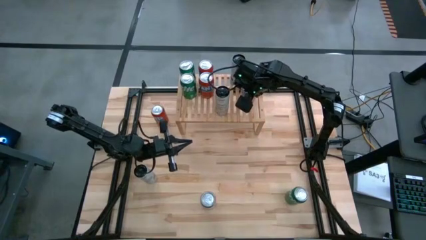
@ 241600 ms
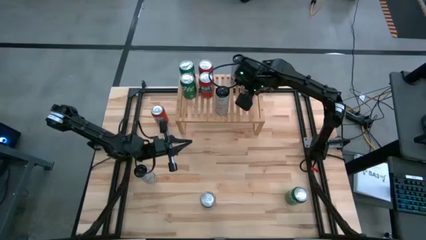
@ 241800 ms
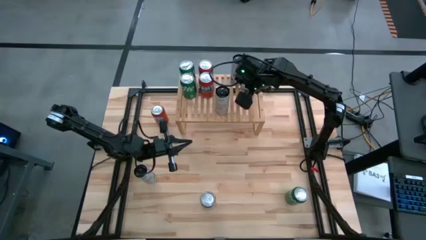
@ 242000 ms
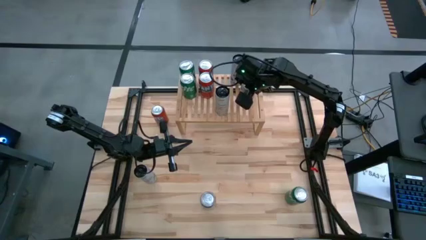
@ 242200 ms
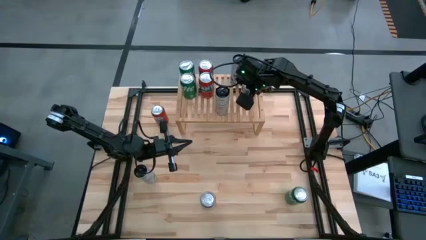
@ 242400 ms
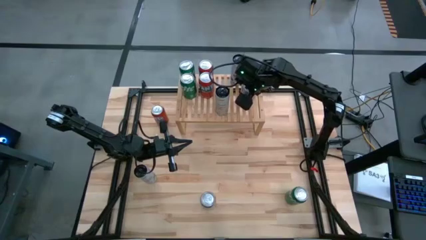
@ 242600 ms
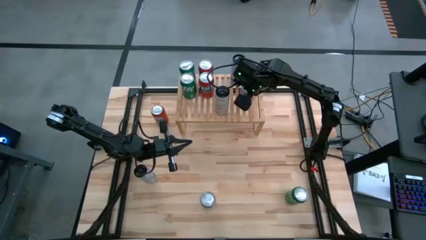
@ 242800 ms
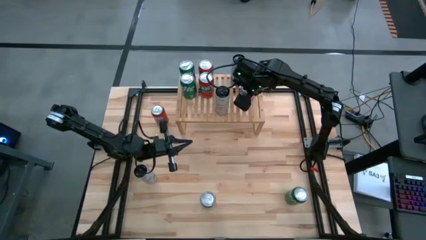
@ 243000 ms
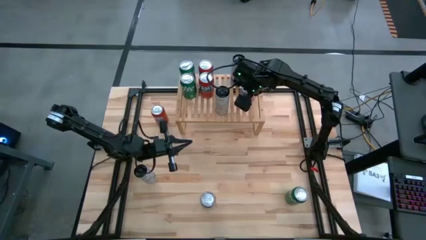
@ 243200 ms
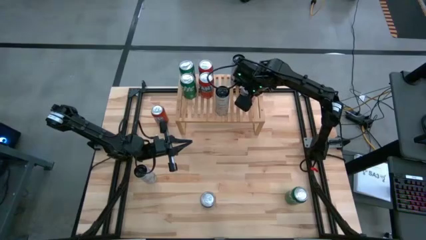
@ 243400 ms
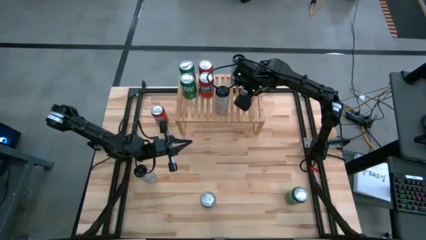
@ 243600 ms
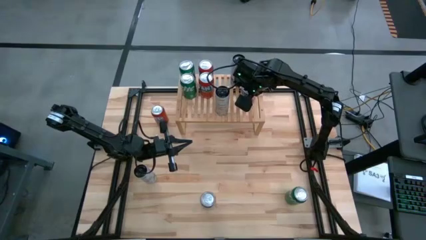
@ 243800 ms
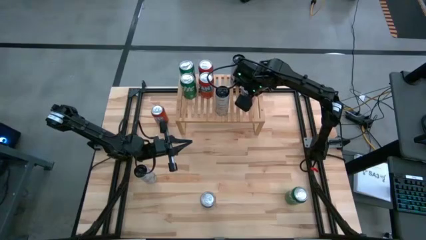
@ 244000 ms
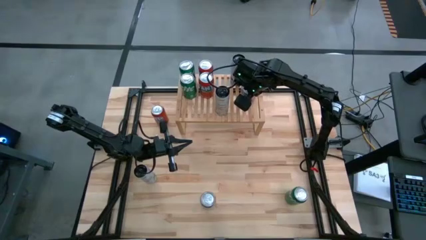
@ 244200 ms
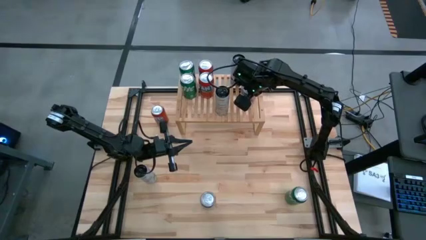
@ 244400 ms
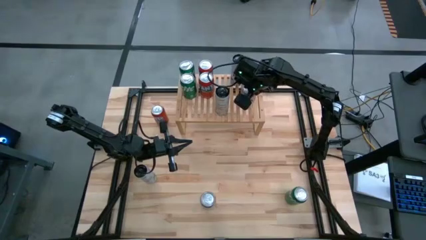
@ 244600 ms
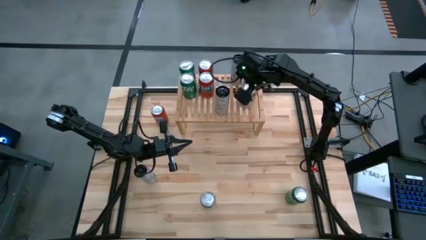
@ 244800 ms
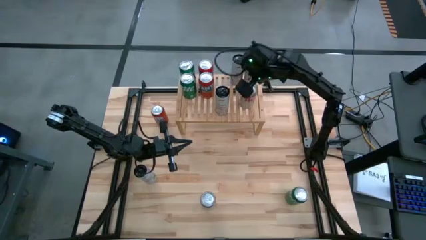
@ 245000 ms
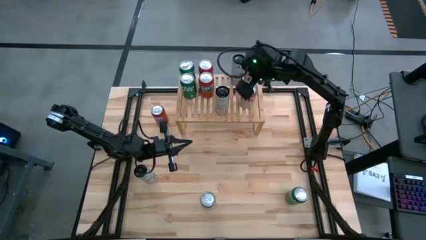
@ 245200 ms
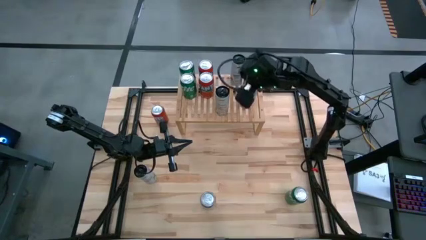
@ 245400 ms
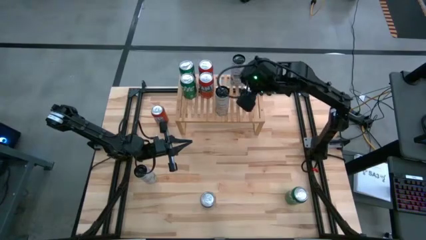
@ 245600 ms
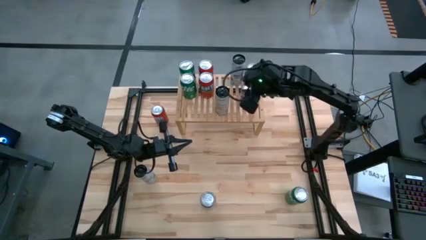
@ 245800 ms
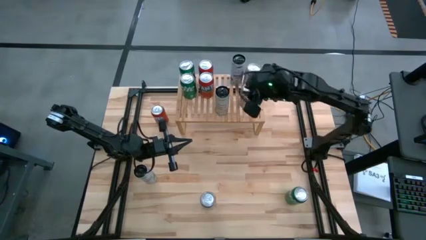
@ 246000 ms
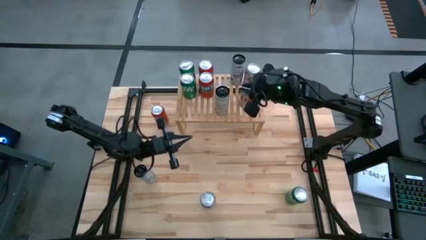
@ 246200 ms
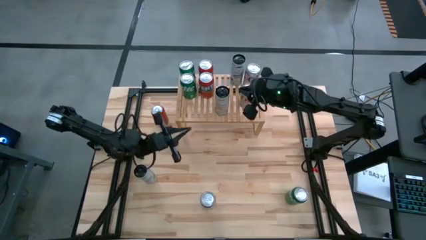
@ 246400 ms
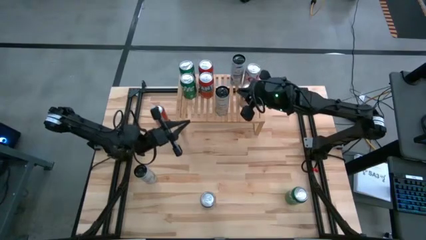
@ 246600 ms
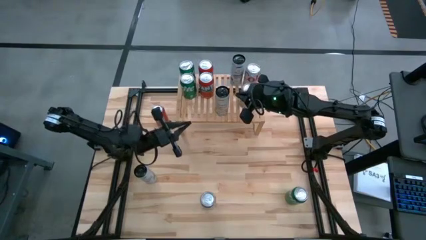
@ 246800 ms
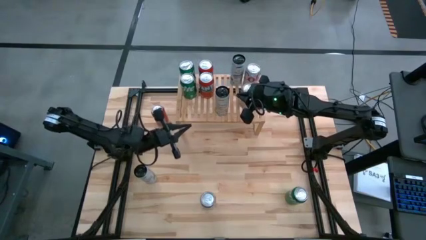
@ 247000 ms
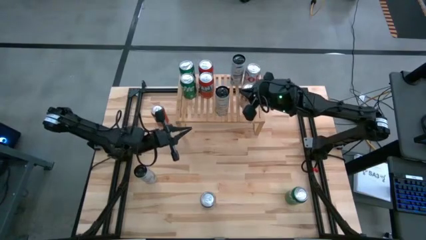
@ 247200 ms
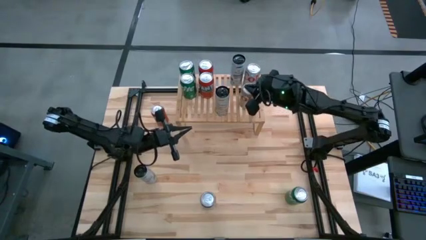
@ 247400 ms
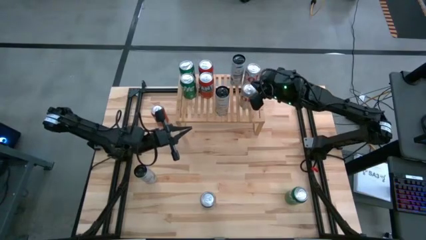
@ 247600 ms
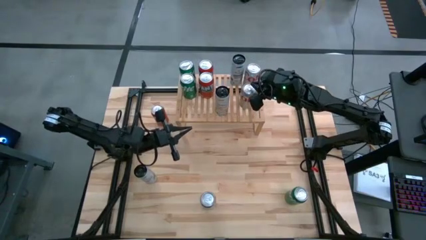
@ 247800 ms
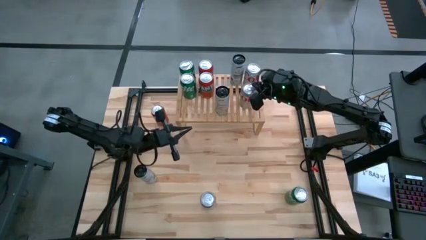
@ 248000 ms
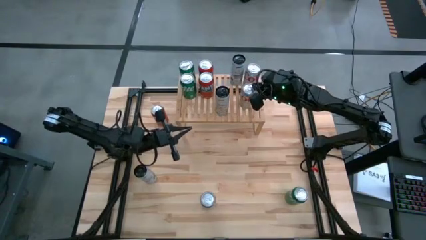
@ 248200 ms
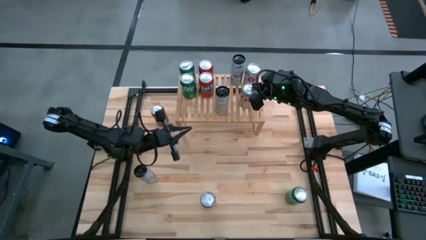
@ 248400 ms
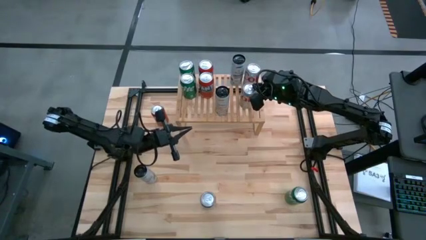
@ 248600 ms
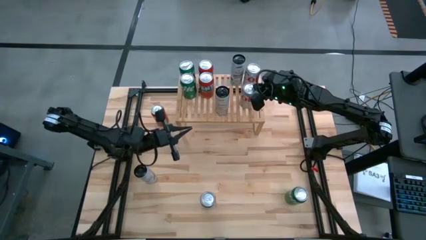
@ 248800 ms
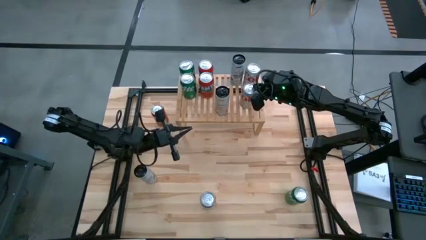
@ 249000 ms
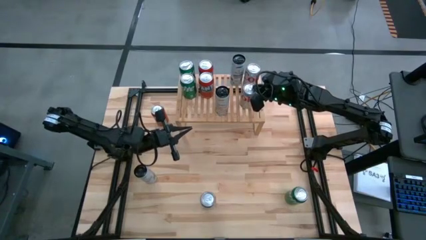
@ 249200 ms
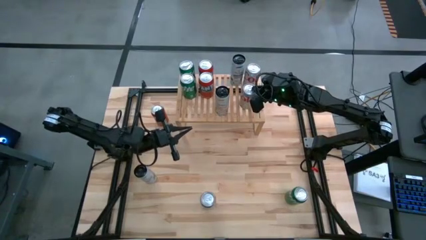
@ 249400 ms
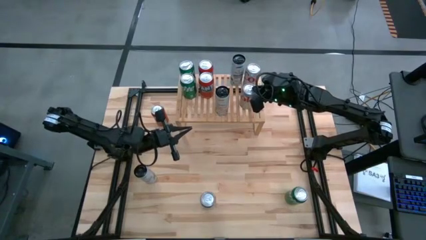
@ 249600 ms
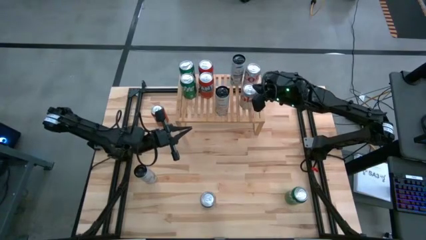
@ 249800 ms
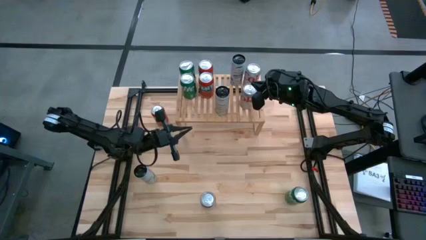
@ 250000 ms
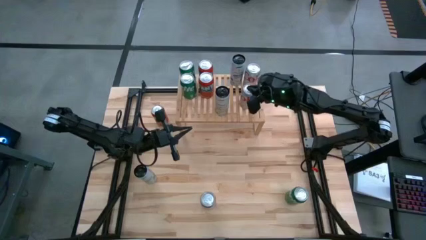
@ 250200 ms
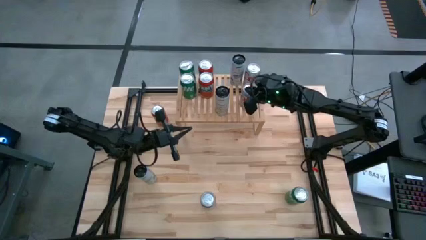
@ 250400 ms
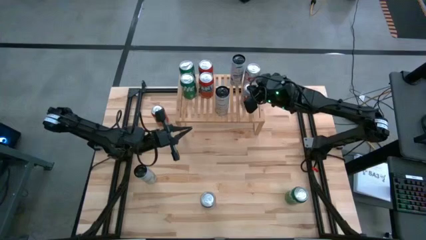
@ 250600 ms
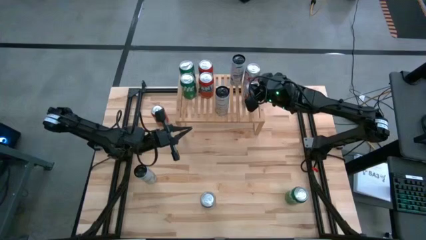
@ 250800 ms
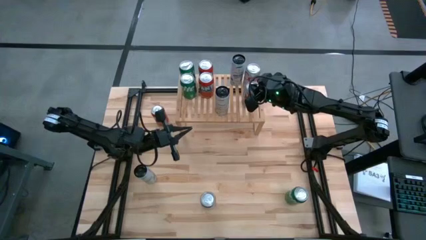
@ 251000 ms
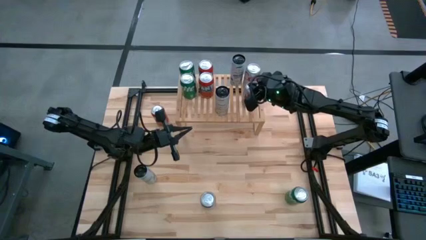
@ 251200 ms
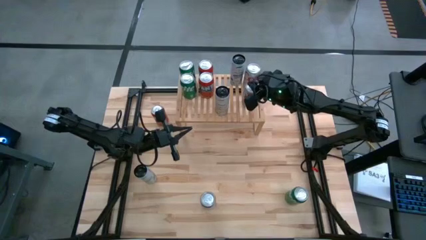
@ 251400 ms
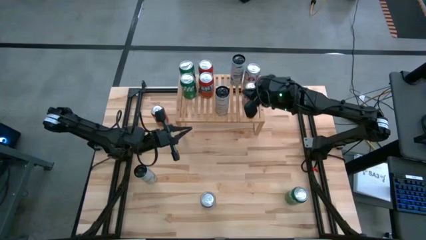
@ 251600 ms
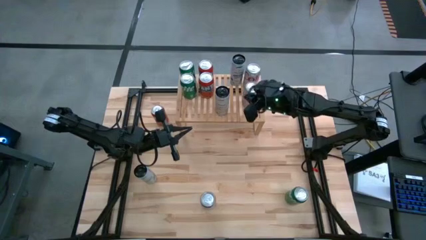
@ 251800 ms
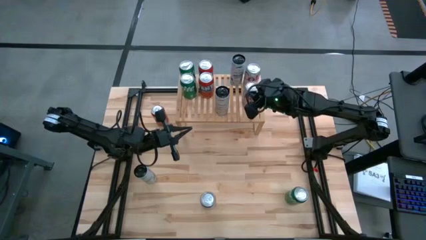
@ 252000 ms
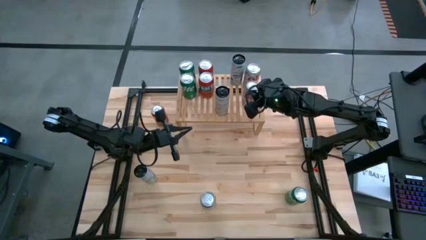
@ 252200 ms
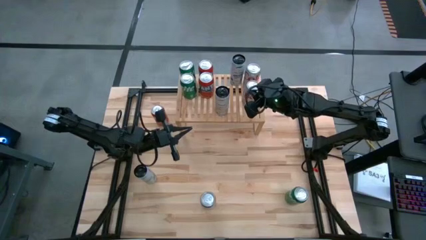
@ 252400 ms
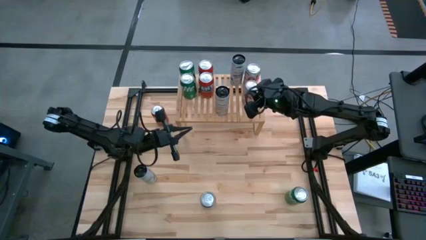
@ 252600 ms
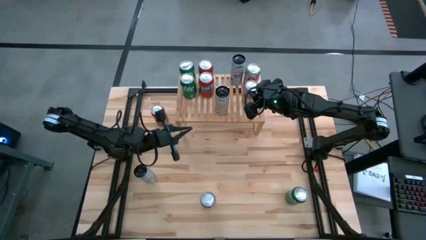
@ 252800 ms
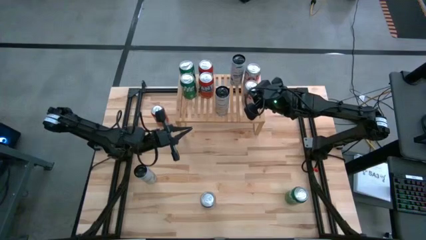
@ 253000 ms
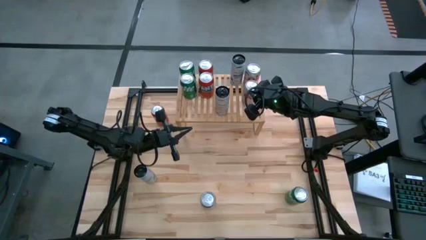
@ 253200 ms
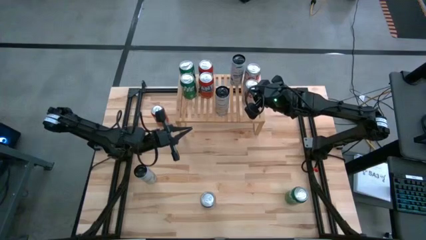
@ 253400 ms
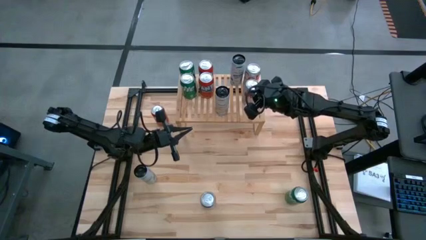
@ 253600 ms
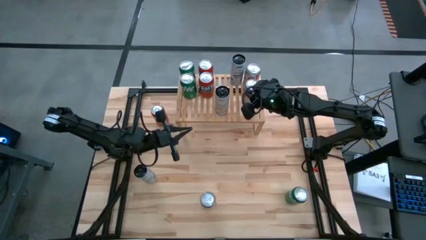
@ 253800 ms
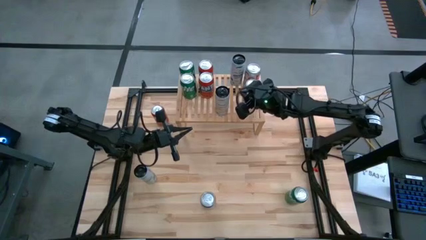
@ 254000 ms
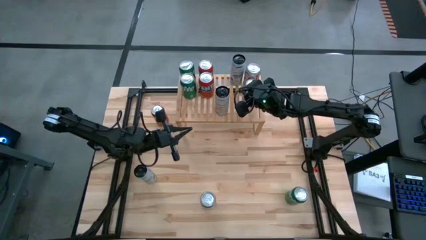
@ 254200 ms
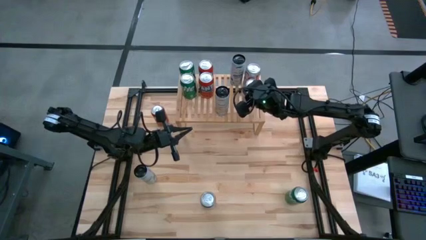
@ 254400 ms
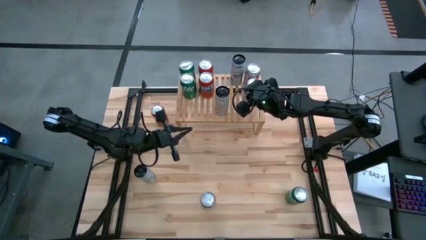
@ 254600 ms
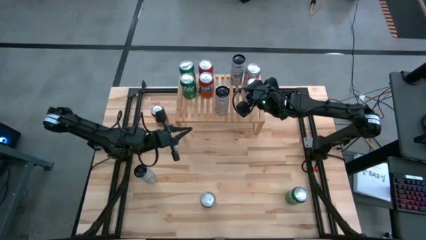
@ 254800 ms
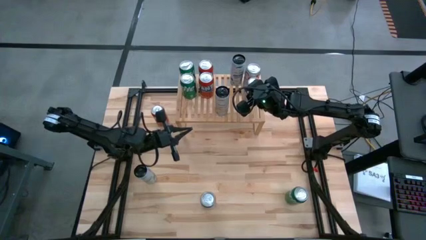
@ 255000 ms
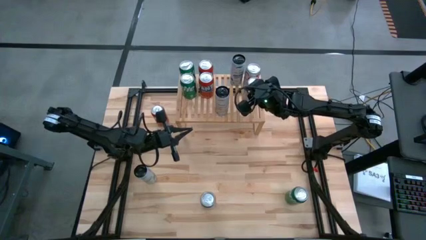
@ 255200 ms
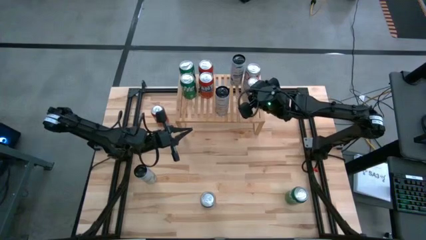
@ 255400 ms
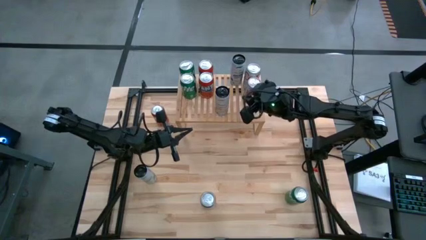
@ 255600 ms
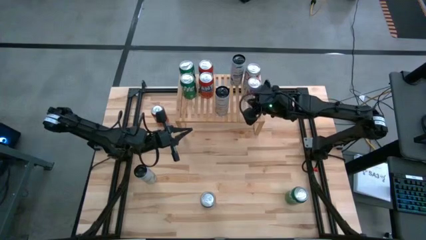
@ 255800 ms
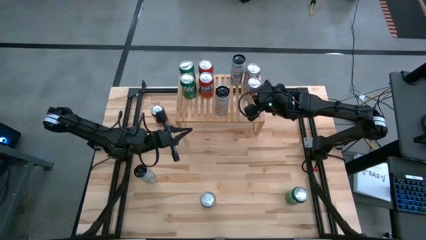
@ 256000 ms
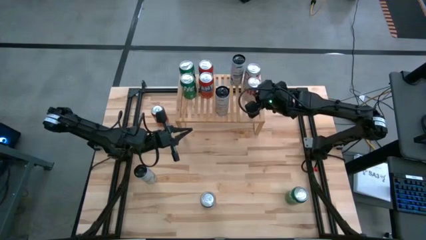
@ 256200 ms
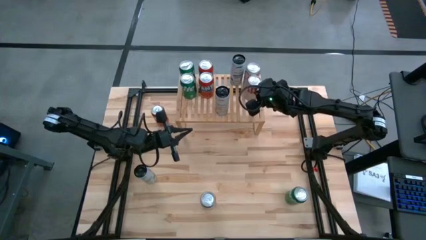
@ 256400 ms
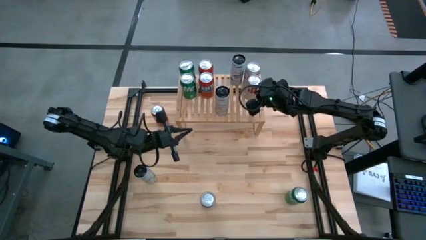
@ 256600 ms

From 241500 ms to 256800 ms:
Task: Place canned beverage on shelf
Put the red silver soda can aligned with the other red silver soda can on the shelf
